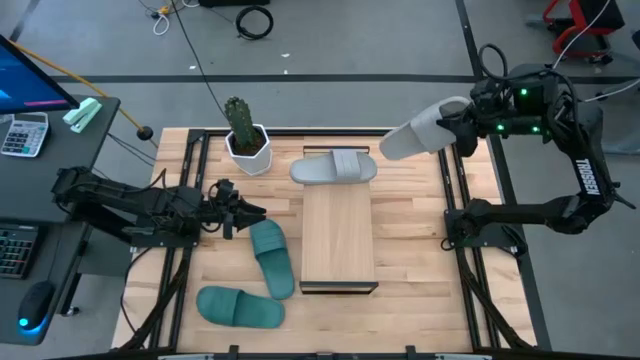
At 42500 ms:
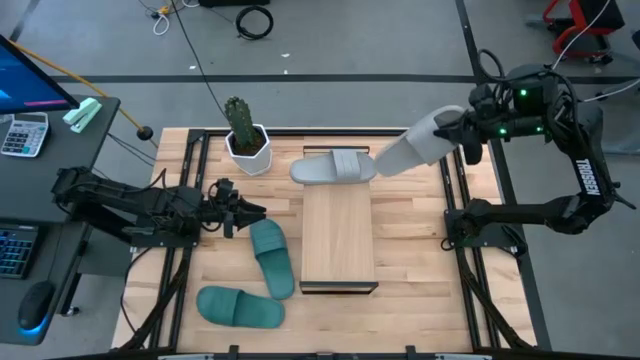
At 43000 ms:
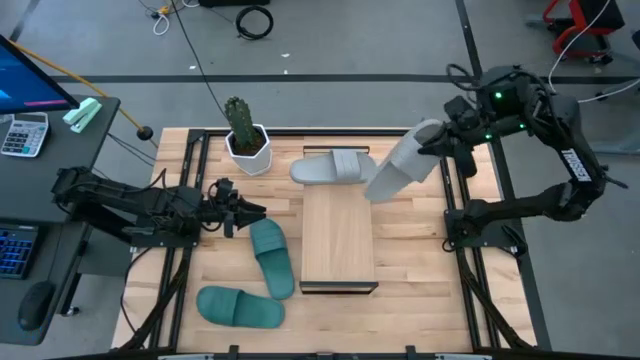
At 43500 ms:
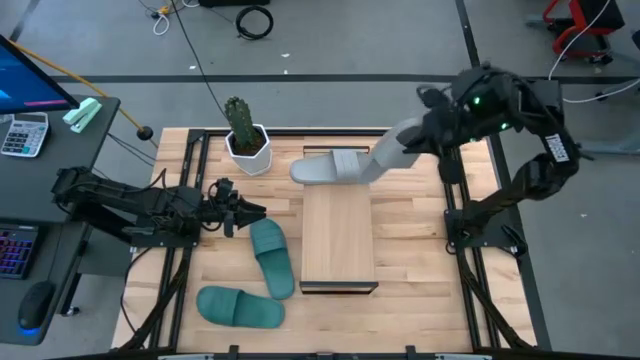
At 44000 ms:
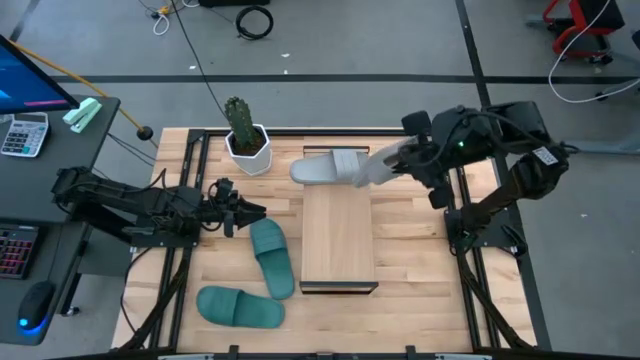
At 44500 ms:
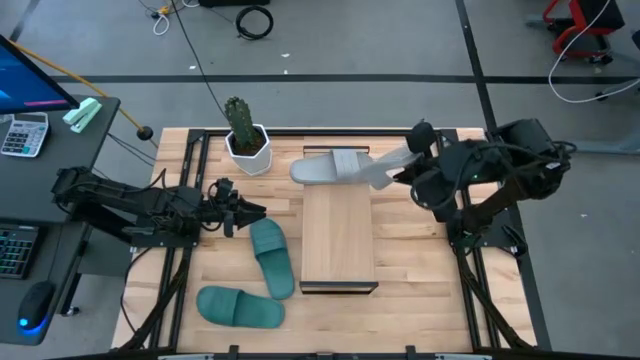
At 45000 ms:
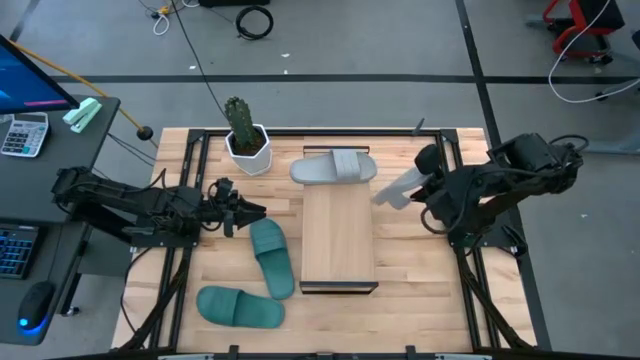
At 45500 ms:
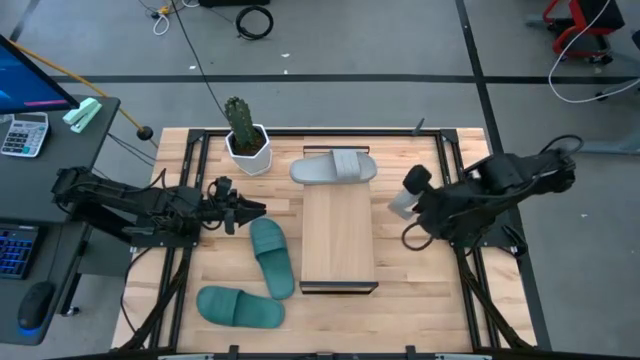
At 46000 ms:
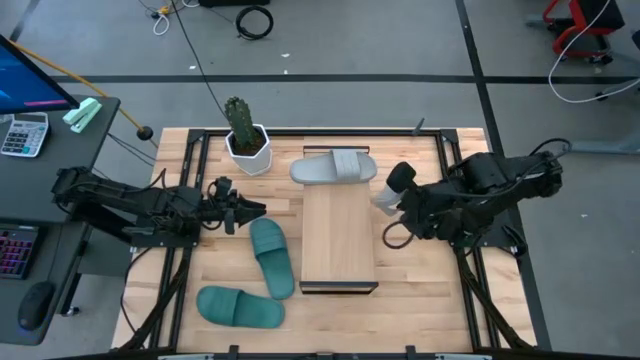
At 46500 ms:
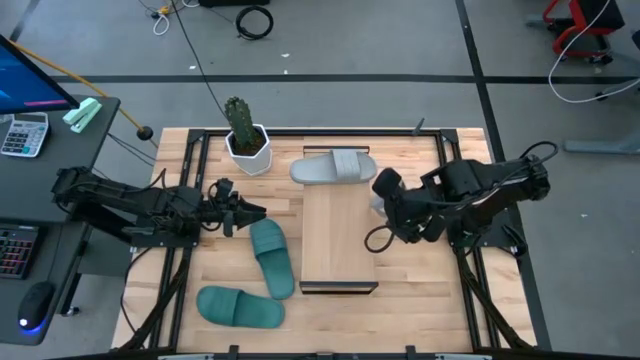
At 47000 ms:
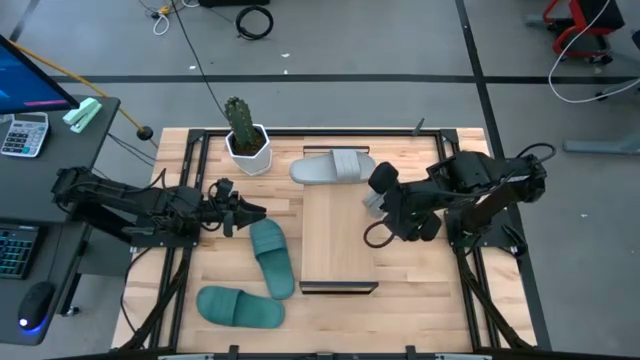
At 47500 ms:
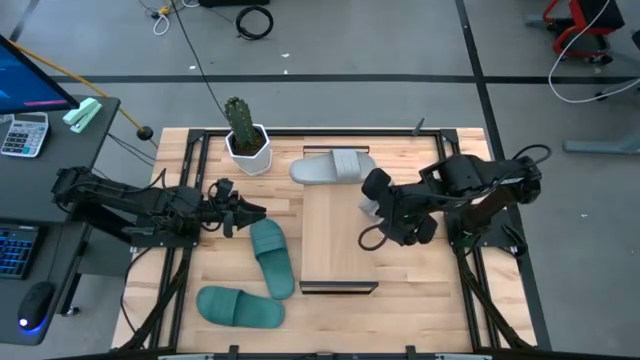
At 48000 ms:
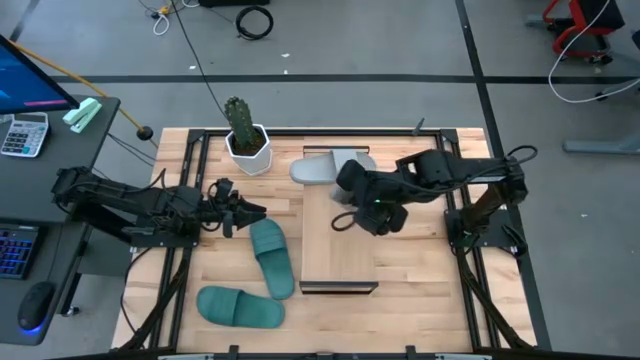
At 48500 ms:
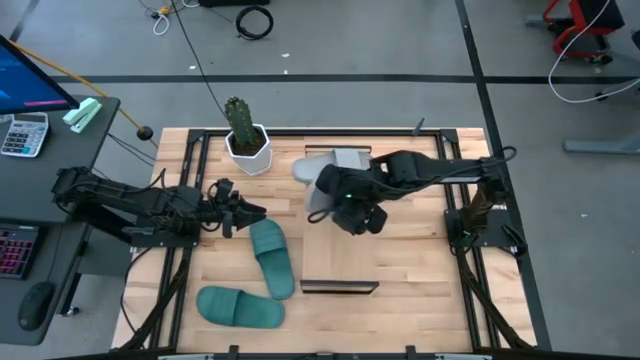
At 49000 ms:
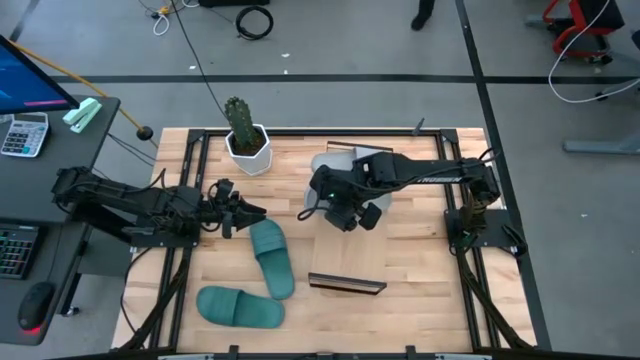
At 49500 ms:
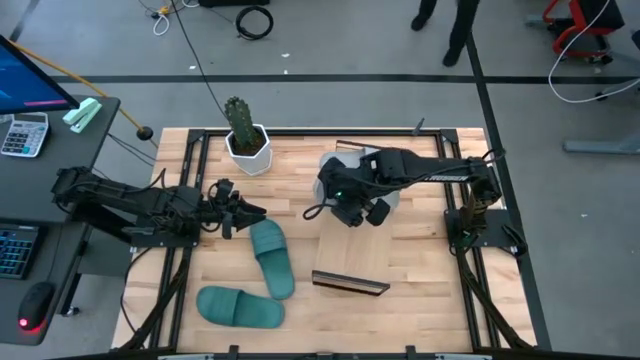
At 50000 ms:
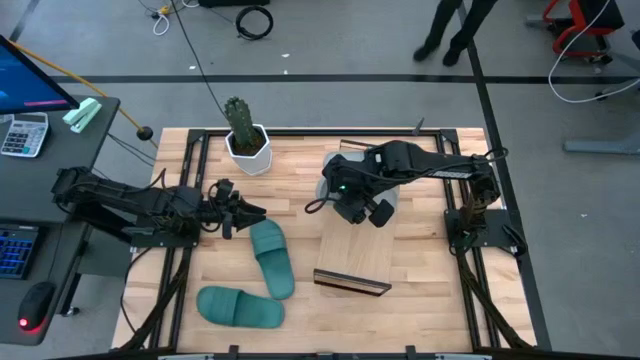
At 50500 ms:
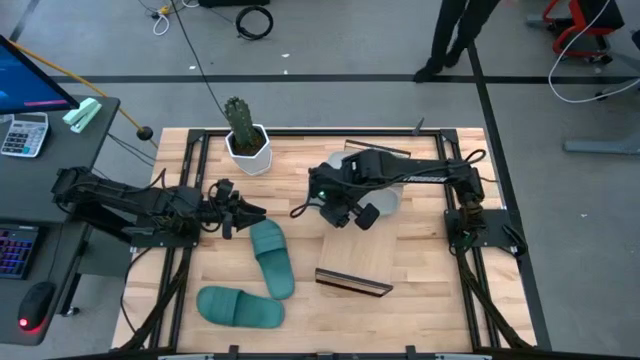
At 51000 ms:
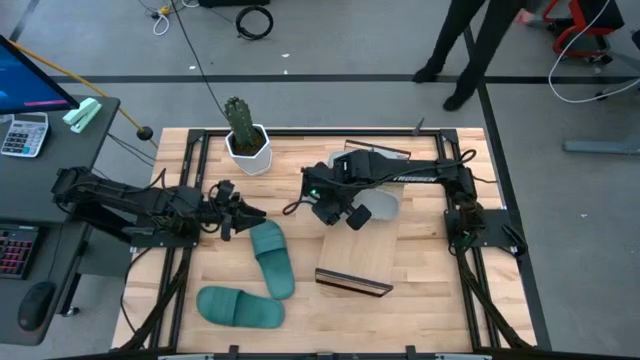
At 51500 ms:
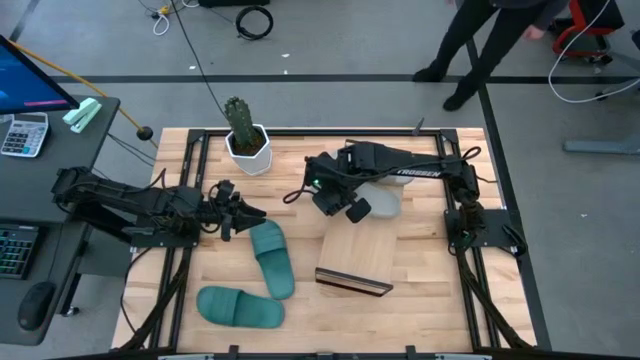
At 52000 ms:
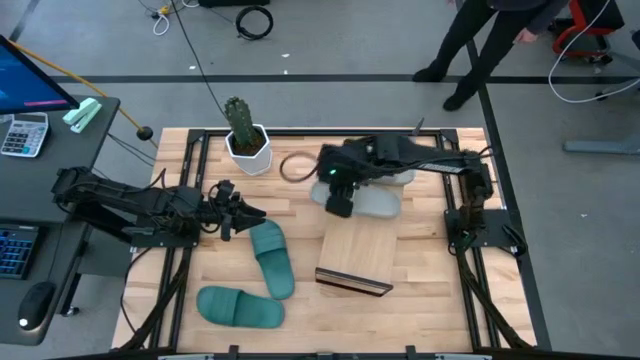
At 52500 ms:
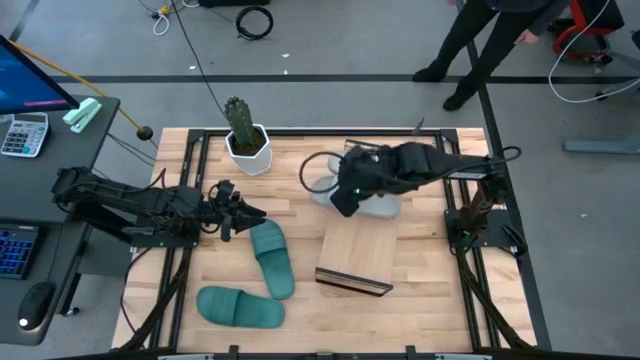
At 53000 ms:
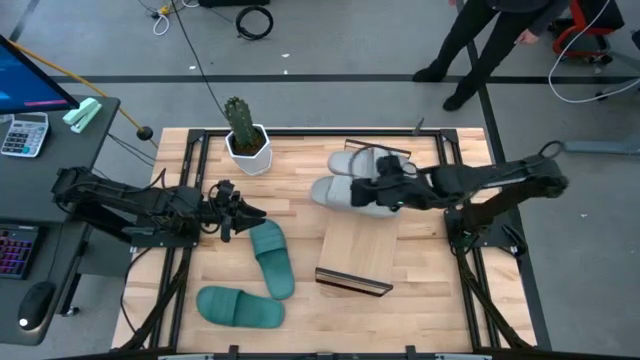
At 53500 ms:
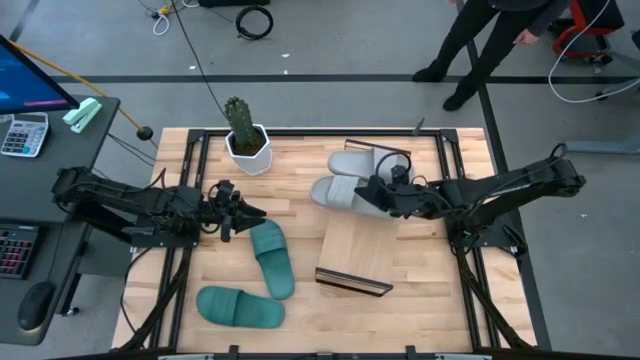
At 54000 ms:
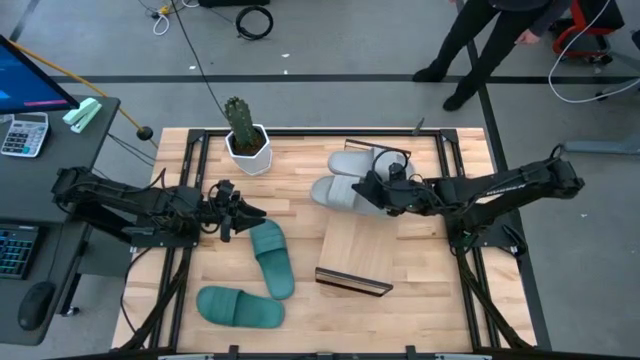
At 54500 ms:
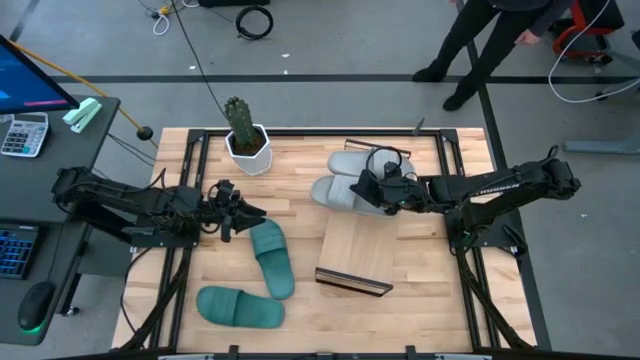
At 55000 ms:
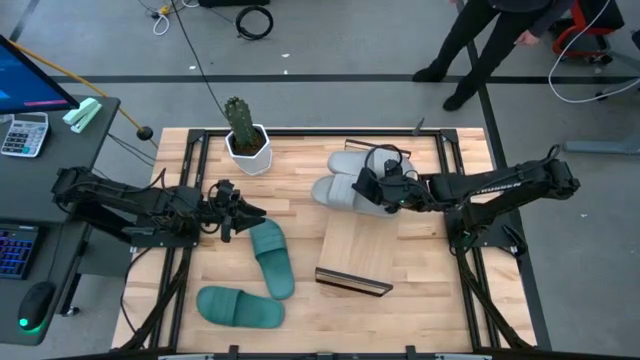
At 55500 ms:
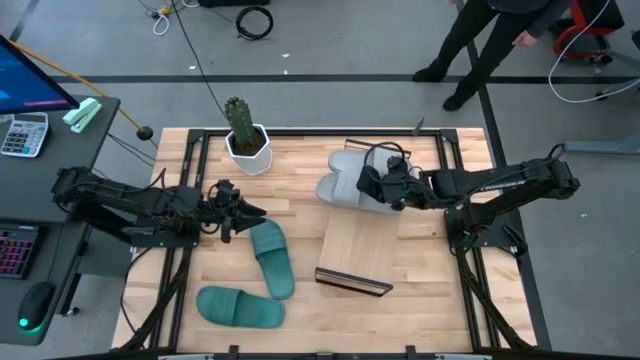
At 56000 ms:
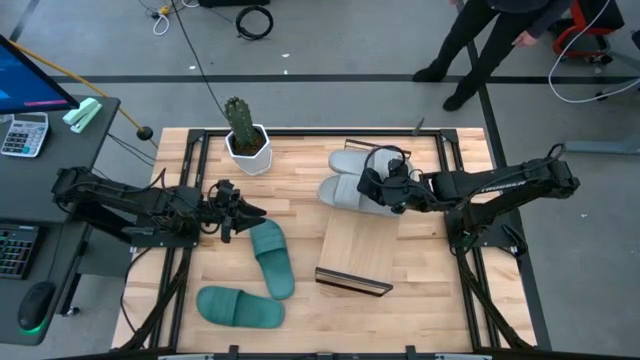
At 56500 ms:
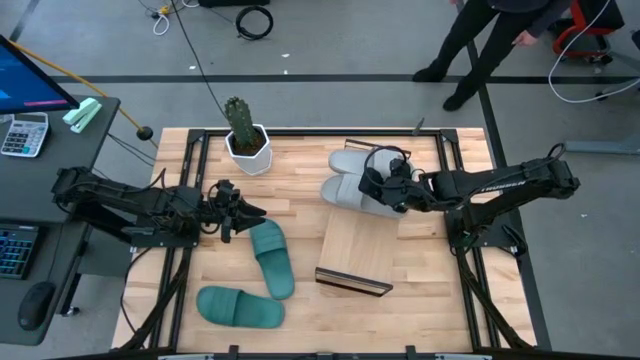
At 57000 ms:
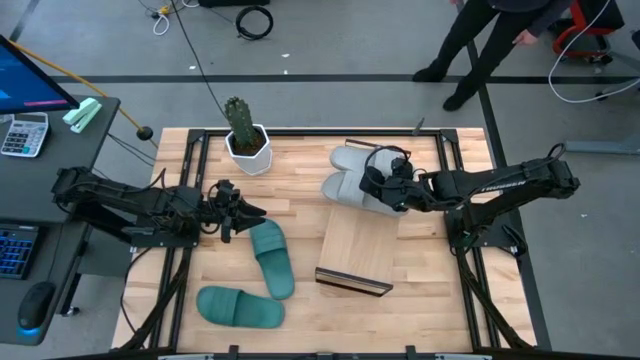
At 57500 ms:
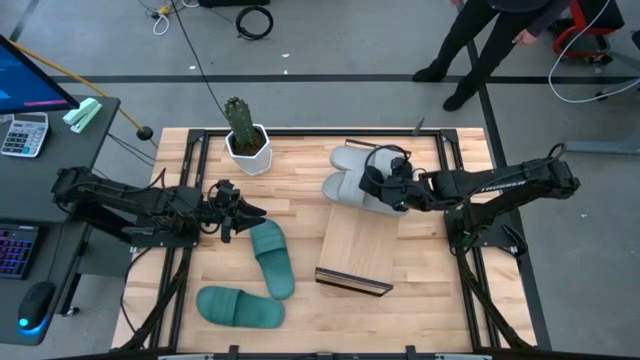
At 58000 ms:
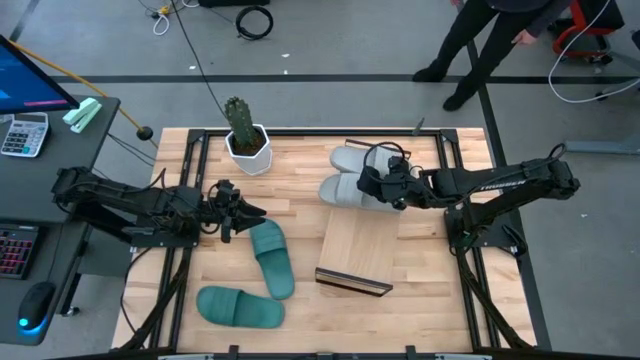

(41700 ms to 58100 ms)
Task: Pick and place slides into the shelf
Put the gray slide on the shelf

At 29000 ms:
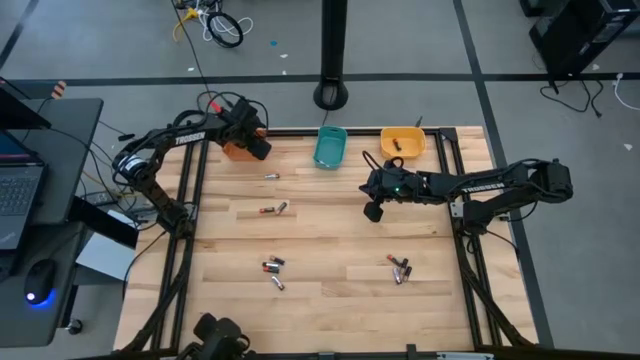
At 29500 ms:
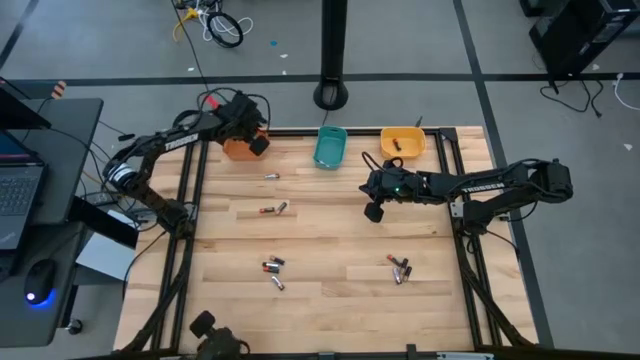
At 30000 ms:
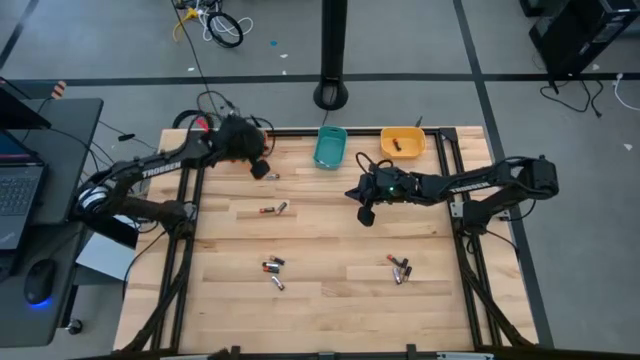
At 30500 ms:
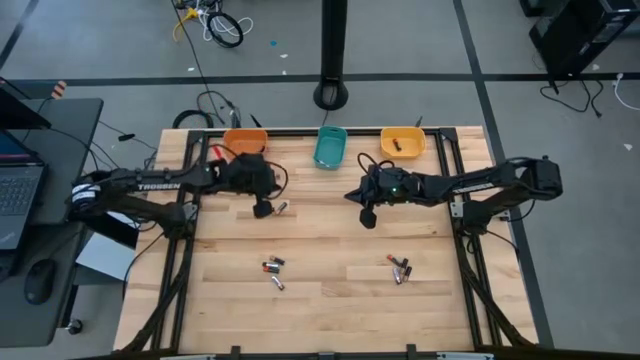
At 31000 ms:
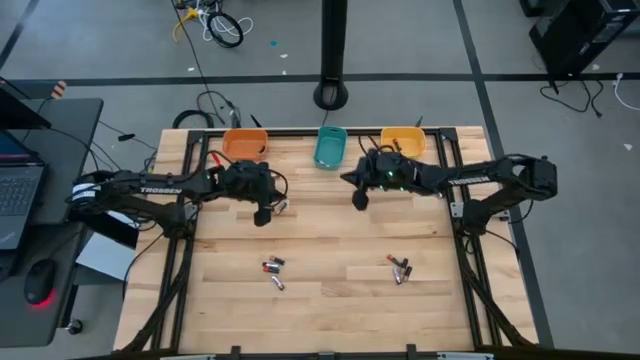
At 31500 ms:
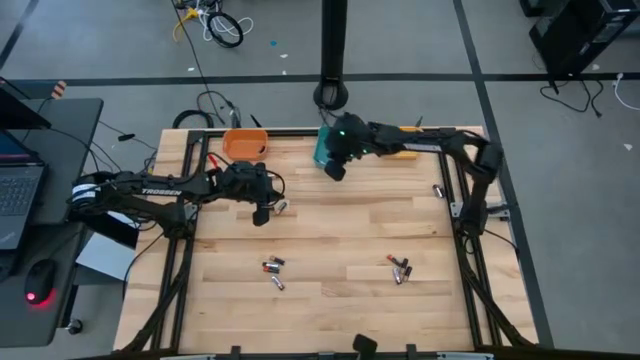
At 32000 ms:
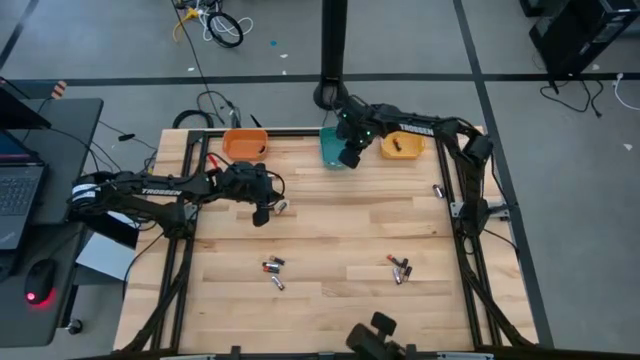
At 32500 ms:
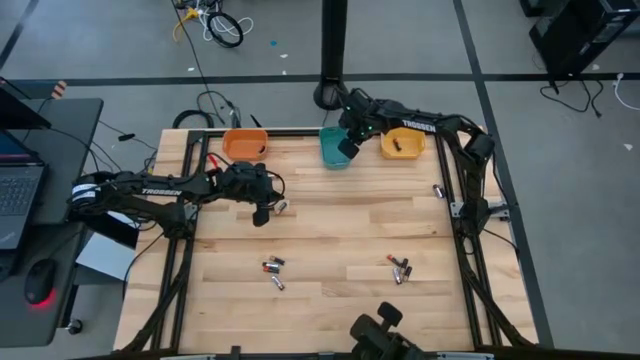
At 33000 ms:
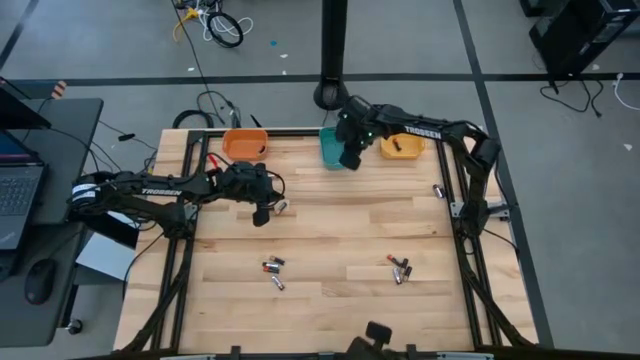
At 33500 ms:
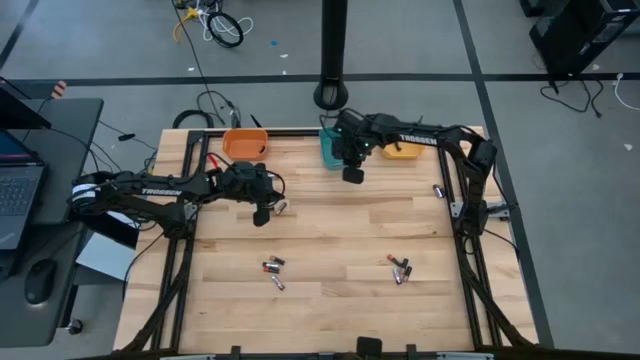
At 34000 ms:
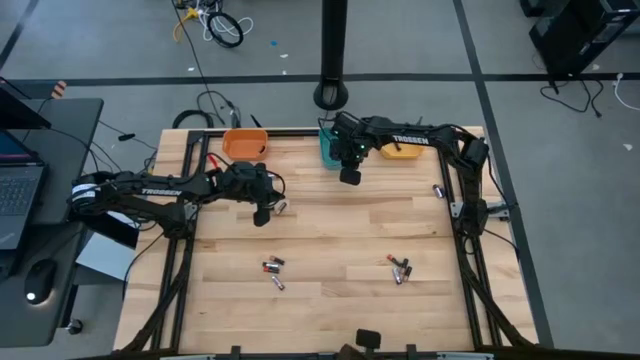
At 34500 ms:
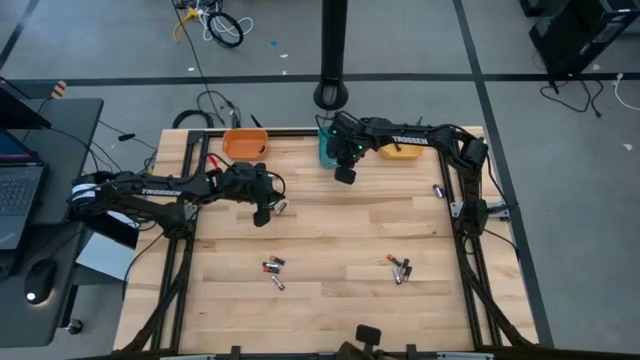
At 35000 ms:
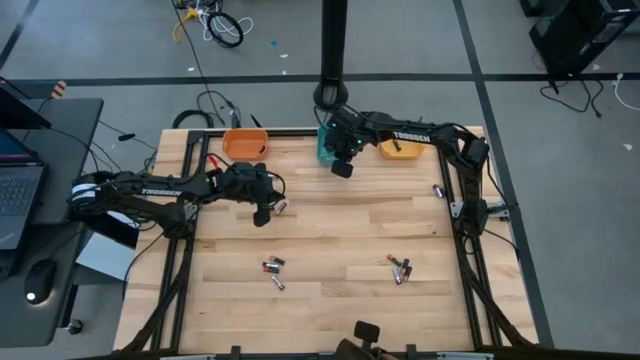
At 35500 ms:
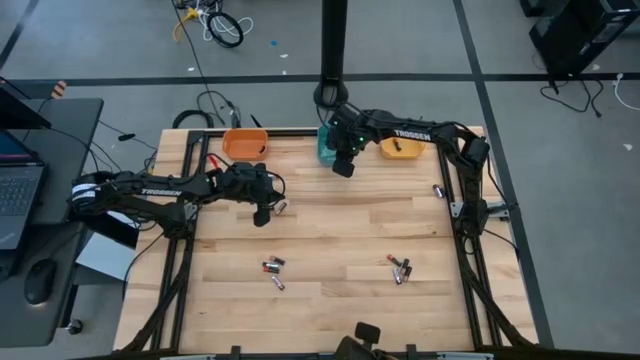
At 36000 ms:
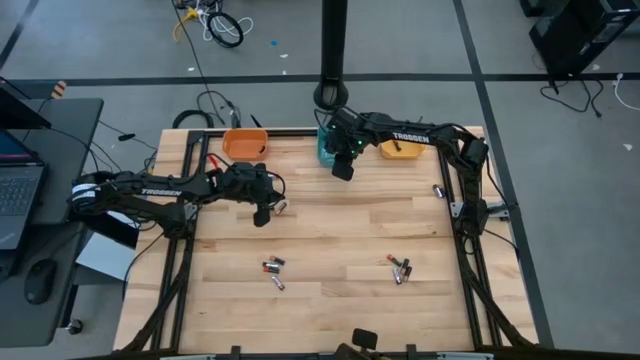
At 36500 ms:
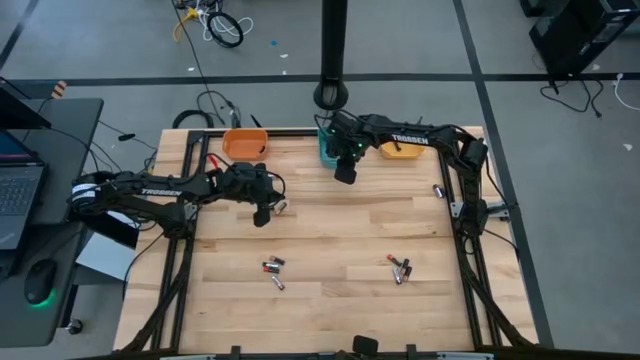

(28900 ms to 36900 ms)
Task: Sort batteries
Adjust the green bin
